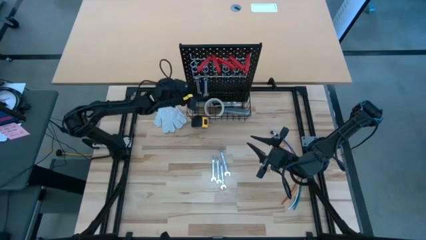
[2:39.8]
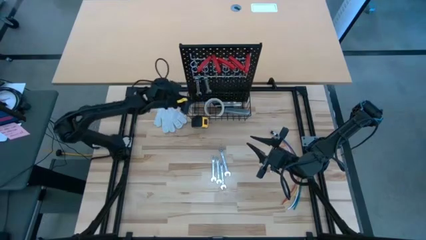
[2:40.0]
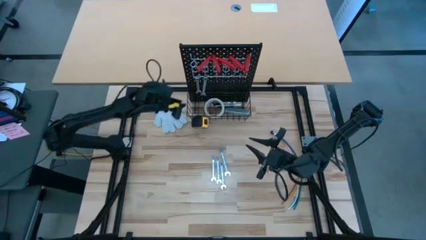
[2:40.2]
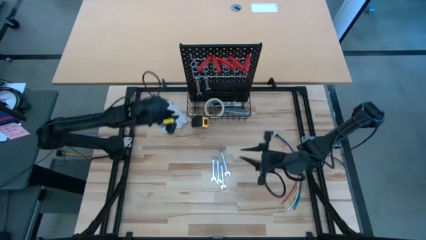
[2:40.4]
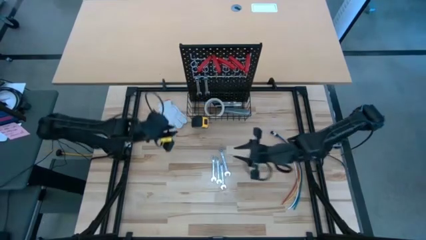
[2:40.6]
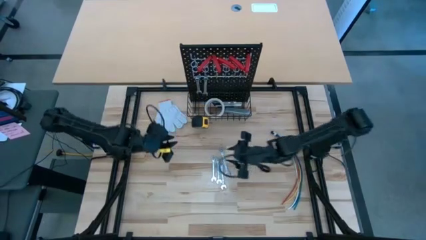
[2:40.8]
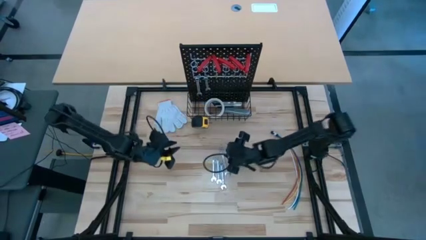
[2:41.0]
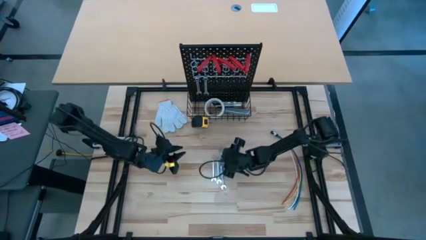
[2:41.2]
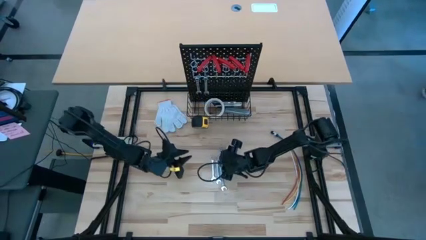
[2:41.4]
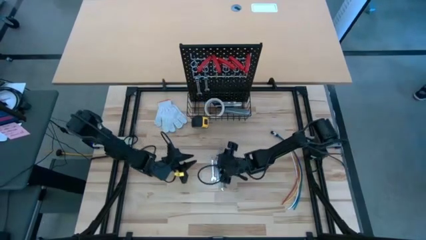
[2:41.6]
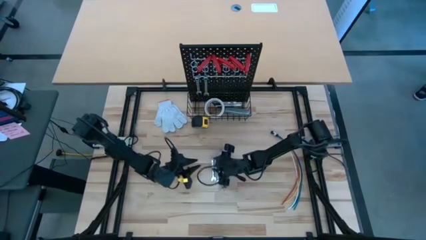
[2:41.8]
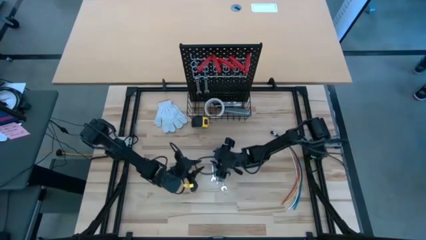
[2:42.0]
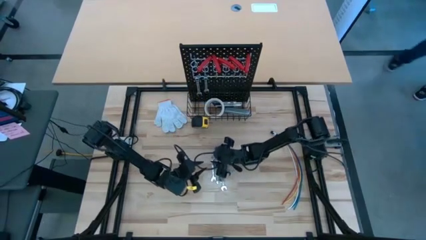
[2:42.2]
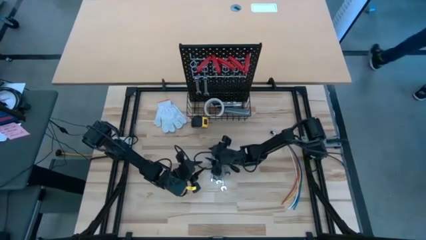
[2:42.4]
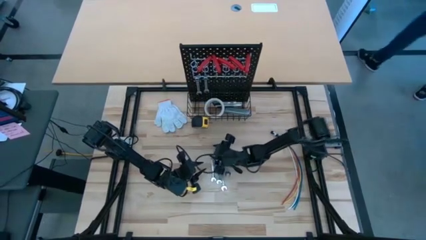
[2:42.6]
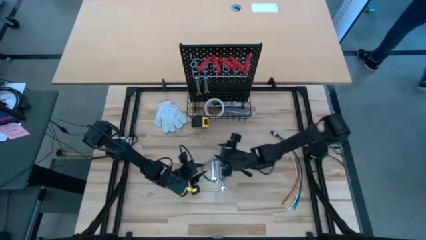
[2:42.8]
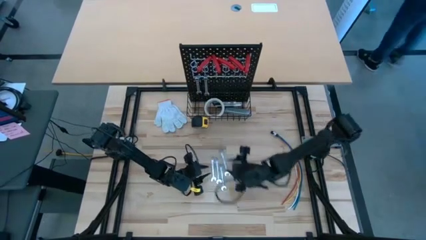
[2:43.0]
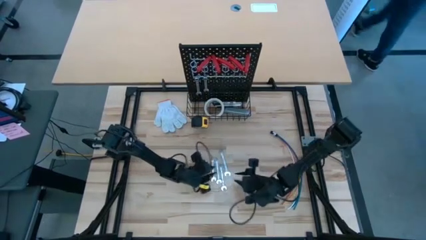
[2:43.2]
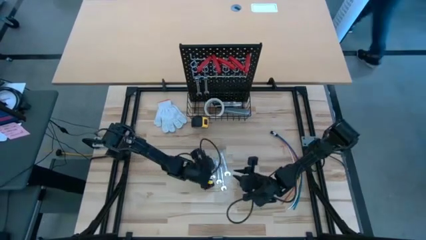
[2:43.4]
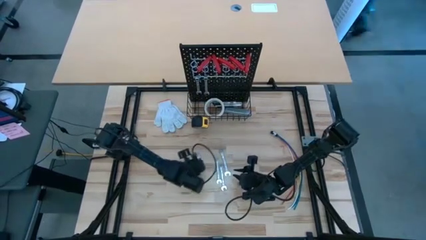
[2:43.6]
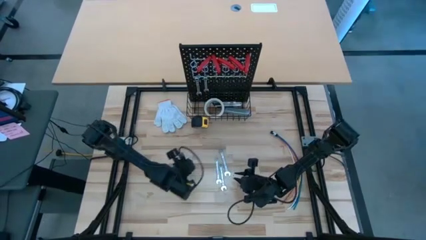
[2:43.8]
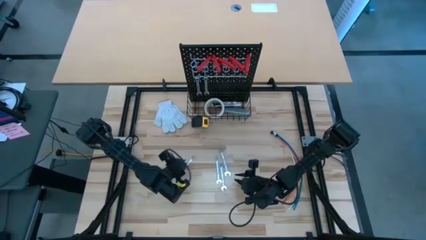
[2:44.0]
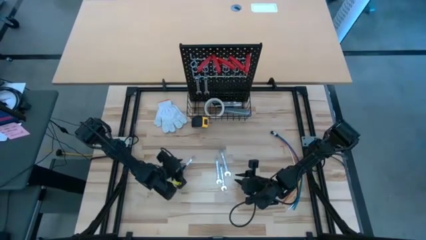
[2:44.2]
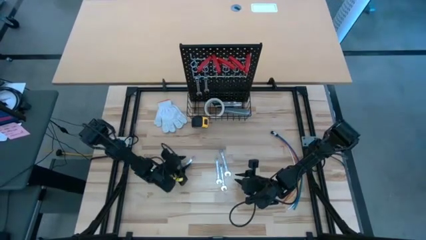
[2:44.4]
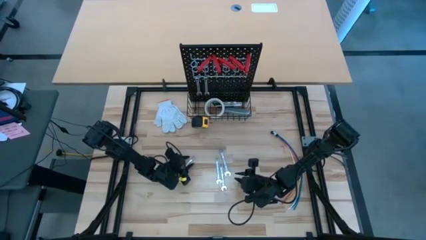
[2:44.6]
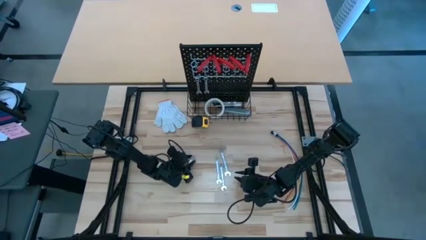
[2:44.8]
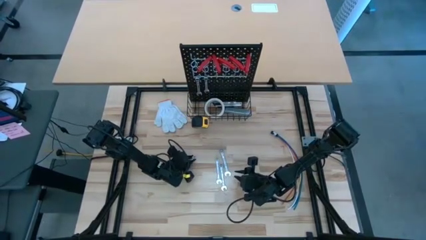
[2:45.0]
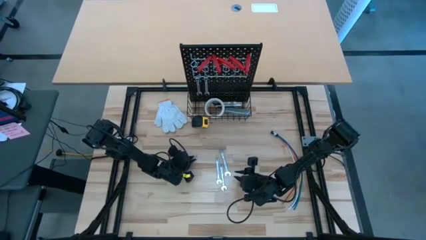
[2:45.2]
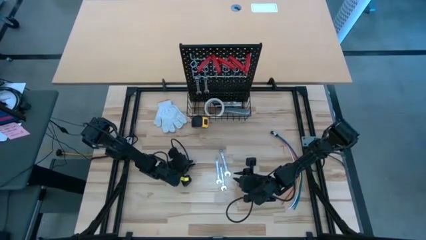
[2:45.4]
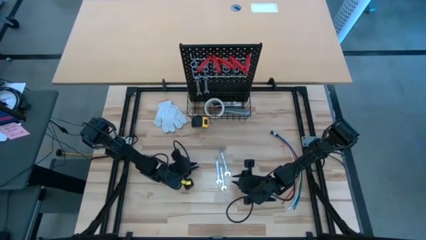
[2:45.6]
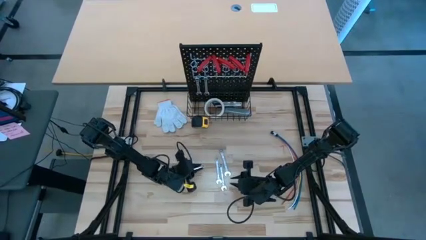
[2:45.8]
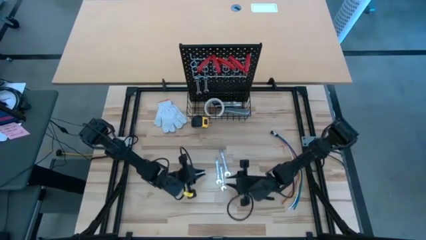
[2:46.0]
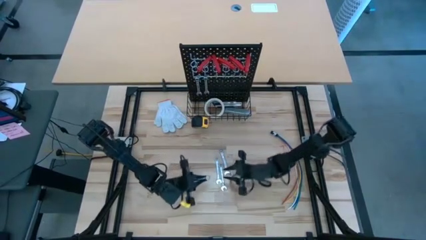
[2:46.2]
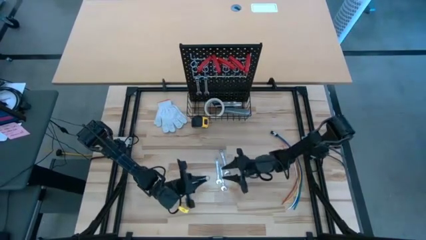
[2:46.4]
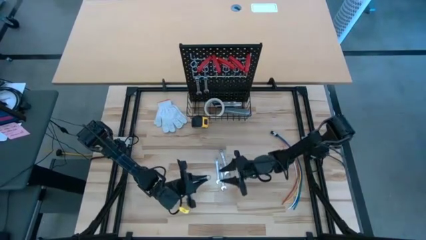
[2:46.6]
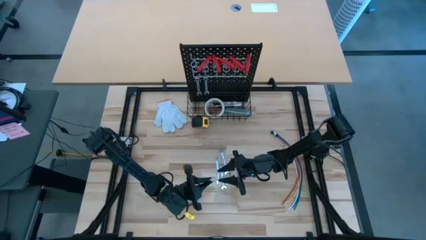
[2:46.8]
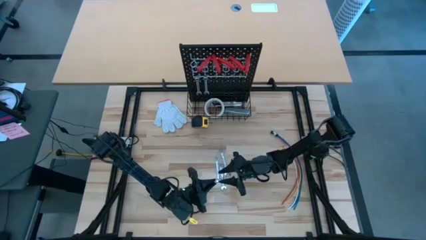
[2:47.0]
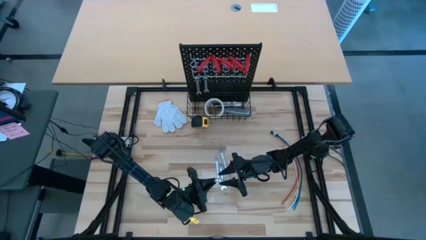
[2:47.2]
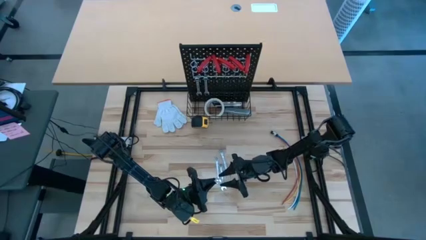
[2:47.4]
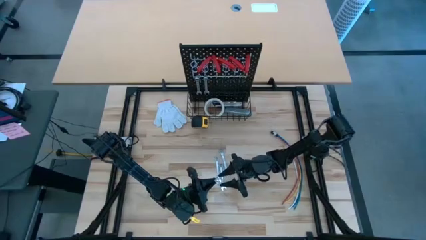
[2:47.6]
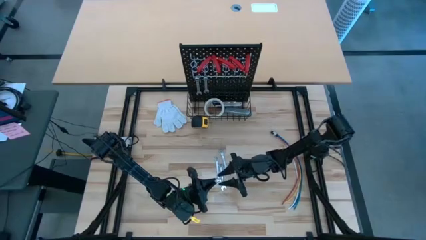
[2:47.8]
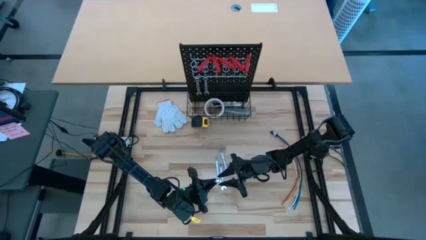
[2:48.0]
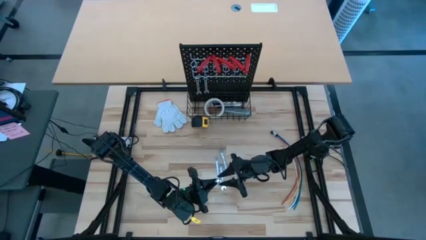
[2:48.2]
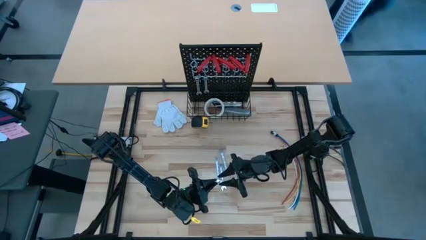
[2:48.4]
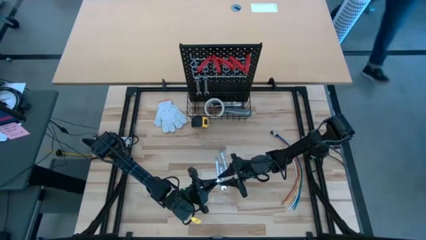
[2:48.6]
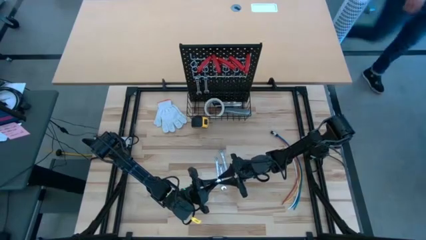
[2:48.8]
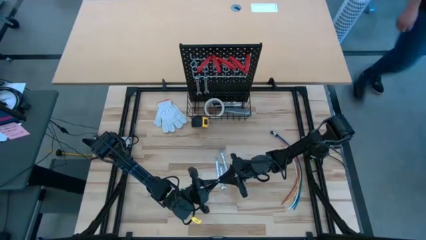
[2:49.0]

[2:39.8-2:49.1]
Task: Hang tools onto peg board
Hang the silver wrench on the pegboard

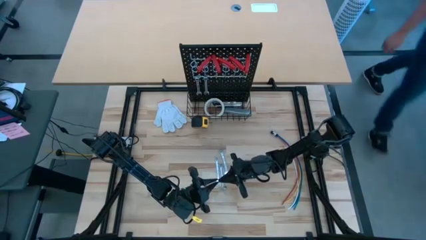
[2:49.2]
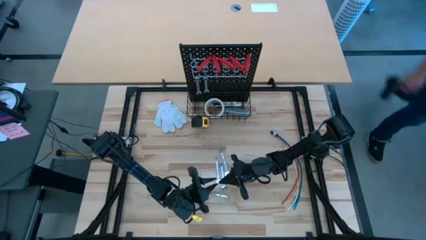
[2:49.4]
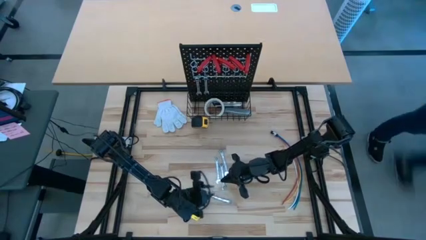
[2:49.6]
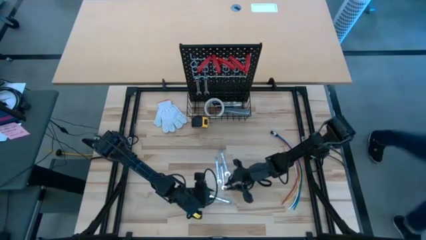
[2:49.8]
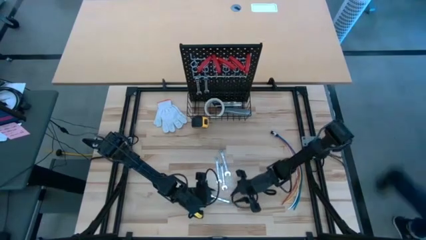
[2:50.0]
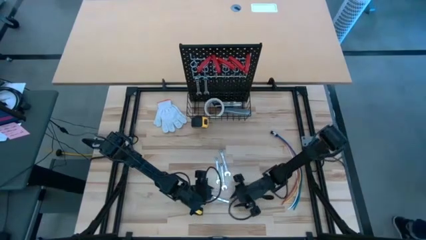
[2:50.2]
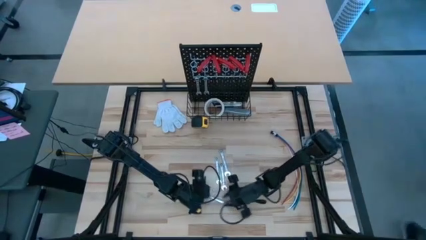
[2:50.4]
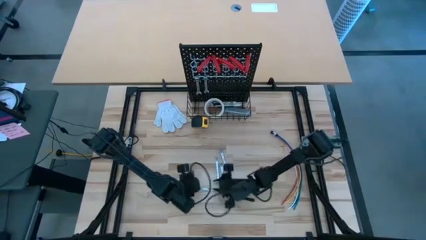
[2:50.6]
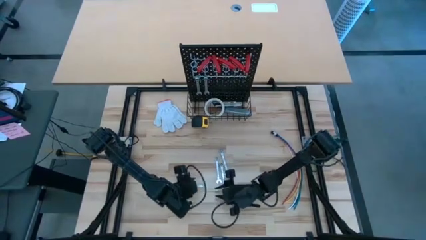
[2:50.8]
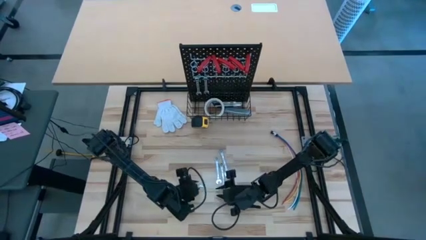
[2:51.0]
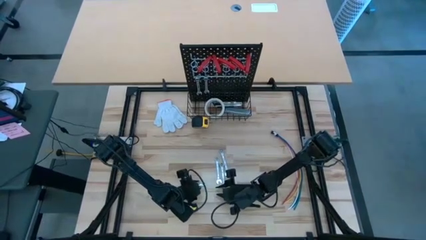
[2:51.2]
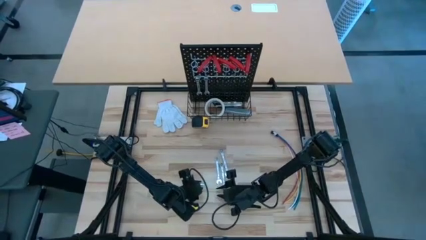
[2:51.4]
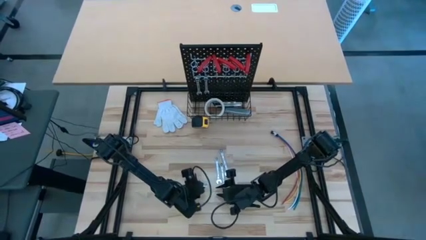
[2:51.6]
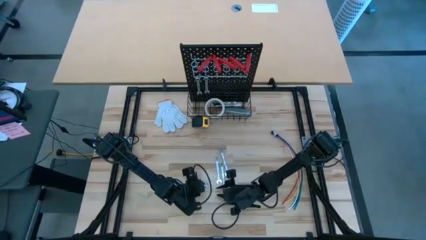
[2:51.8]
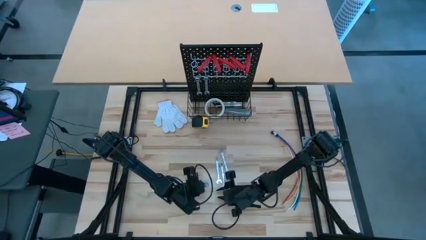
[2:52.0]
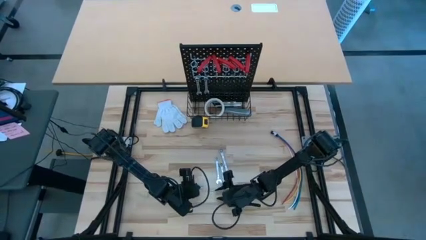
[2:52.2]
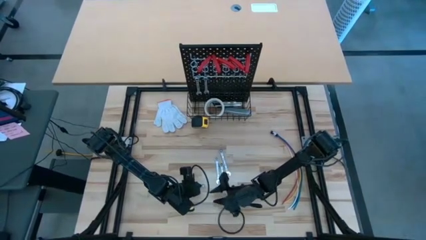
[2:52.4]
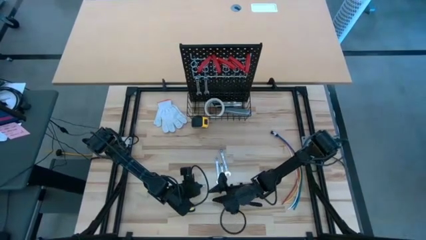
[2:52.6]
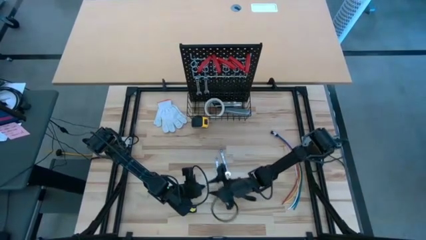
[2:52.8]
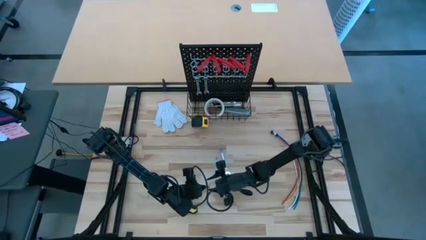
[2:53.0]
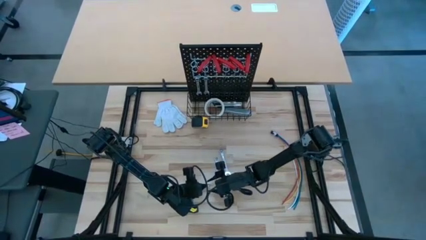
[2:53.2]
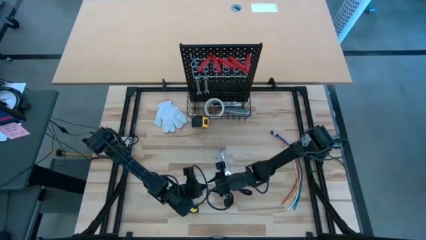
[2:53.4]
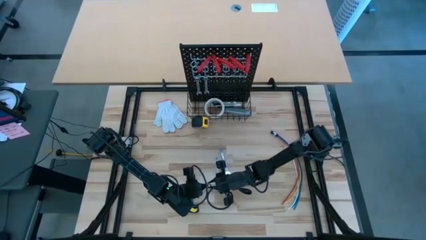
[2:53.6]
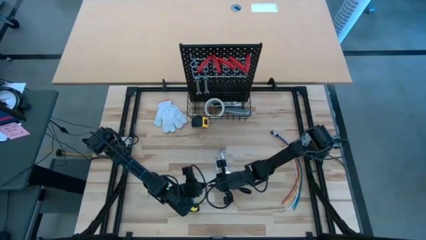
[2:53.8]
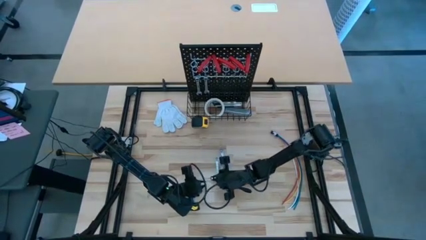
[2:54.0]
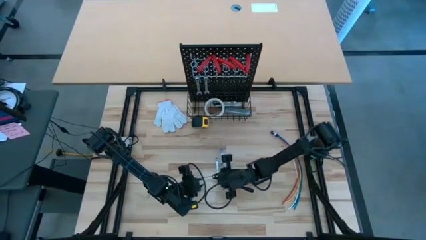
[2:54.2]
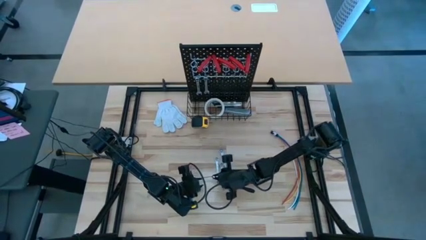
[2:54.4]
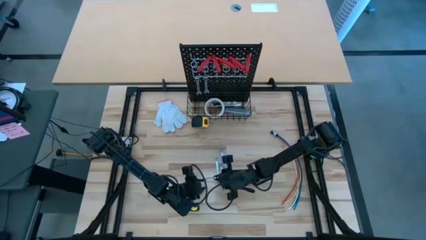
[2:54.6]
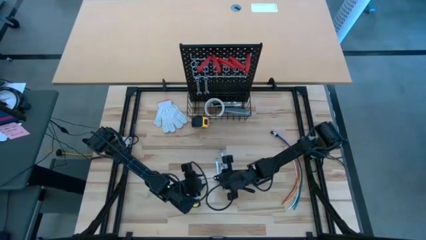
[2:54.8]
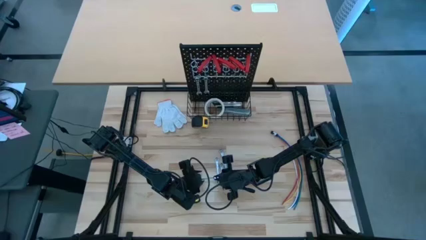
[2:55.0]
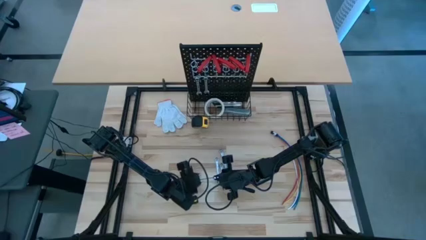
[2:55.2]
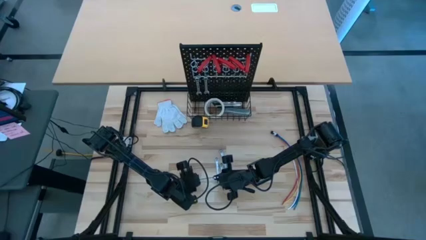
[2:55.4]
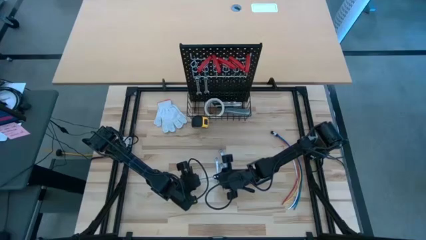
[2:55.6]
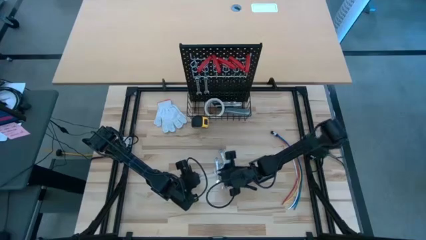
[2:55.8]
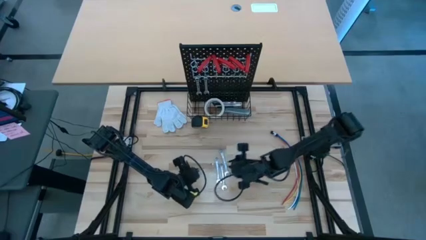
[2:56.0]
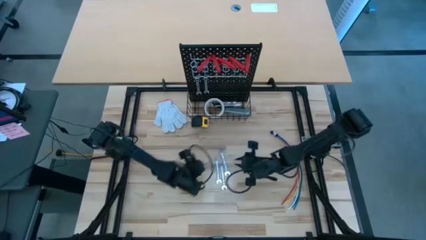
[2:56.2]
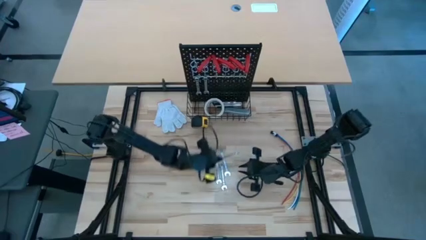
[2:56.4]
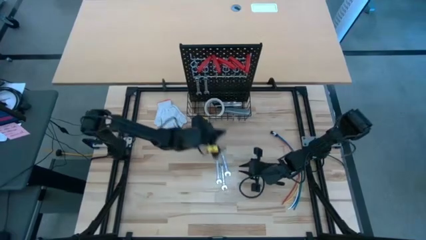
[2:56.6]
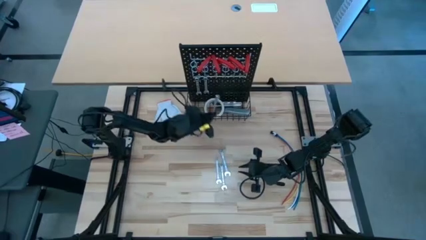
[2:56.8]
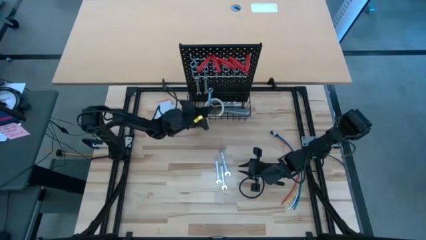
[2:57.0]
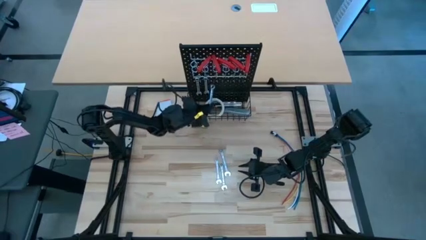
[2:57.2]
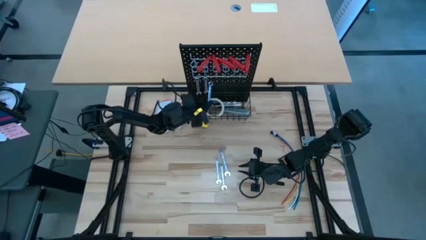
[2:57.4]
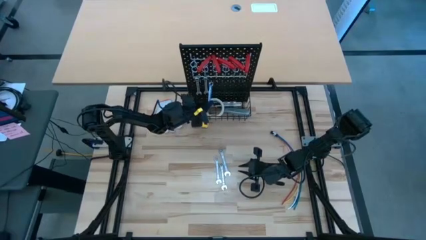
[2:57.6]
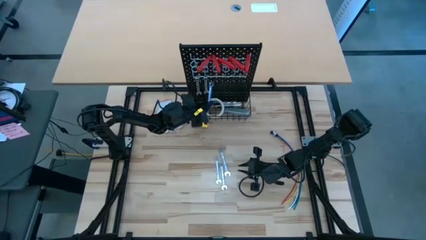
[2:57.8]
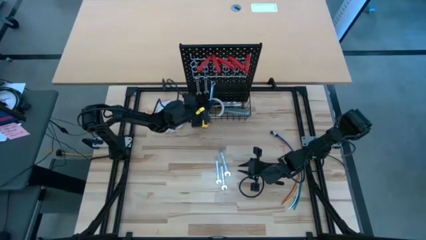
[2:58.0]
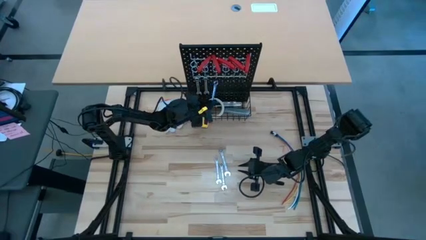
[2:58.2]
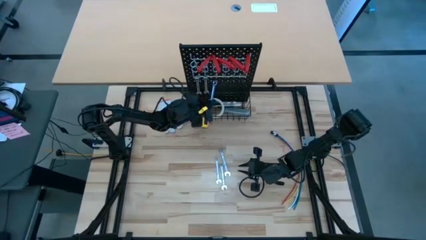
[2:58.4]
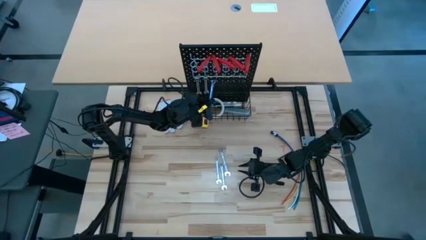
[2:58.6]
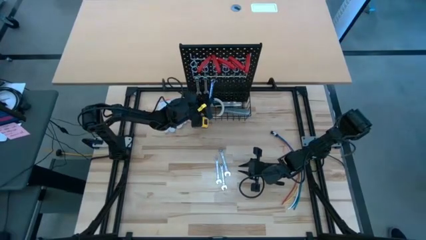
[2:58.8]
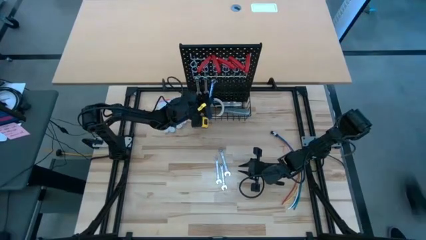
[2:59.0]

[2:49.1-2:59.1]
Hang the silver wrench on the pegboard
